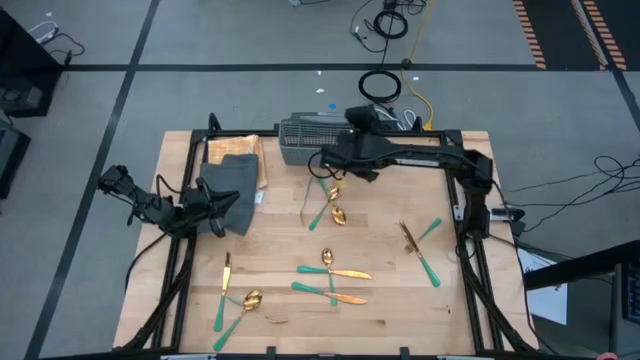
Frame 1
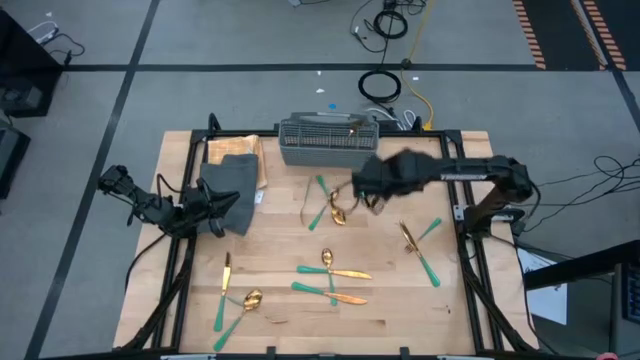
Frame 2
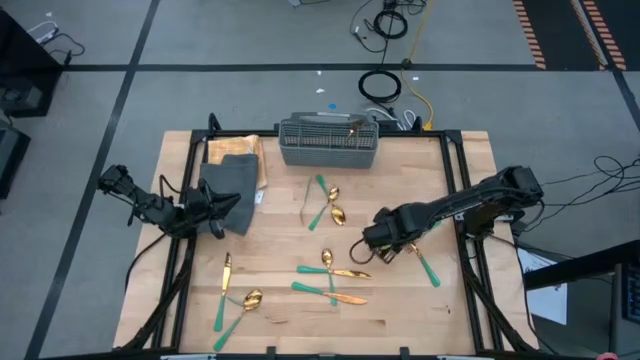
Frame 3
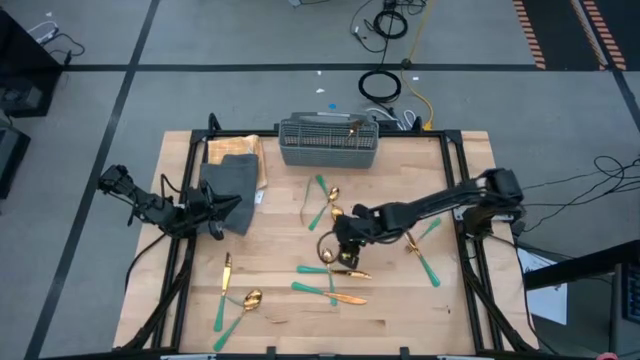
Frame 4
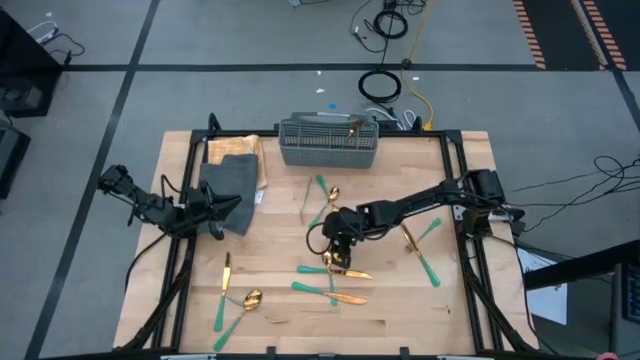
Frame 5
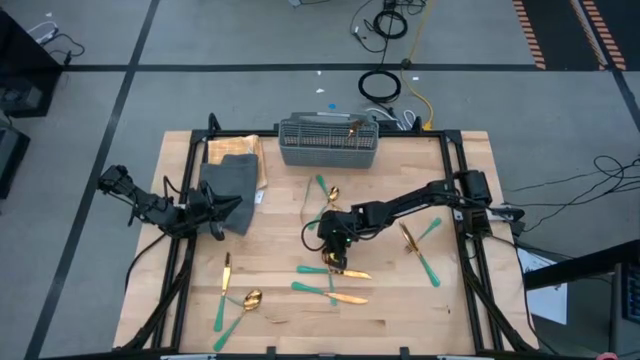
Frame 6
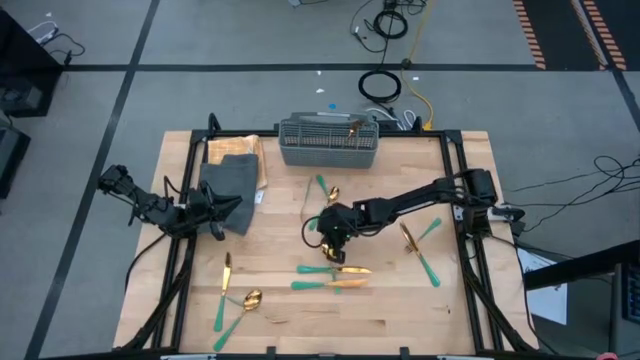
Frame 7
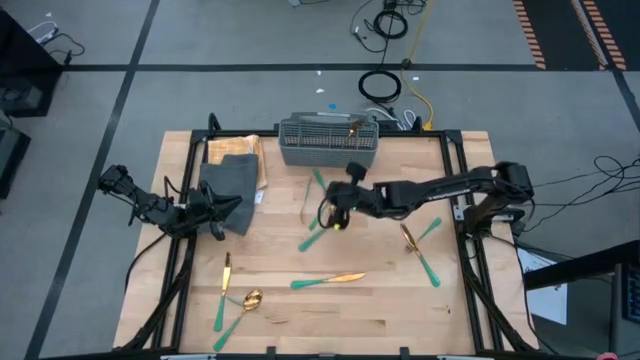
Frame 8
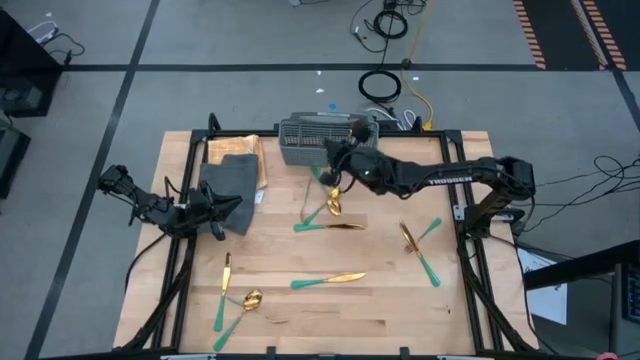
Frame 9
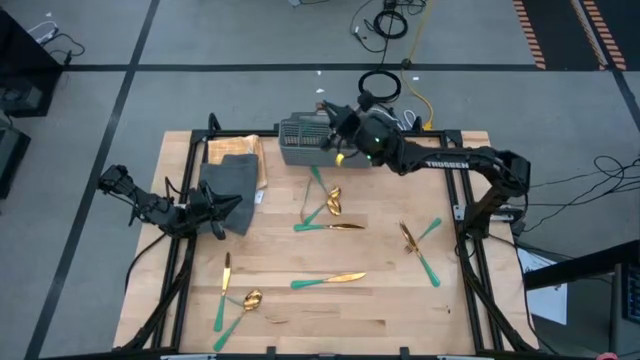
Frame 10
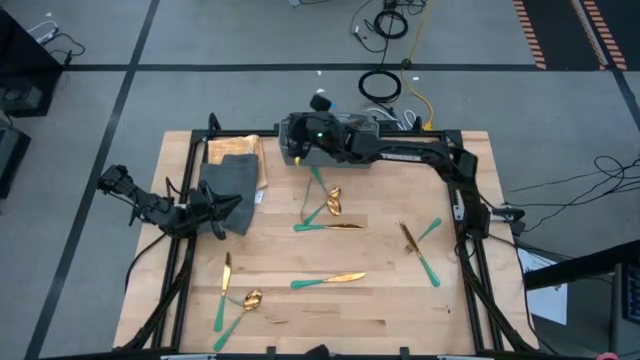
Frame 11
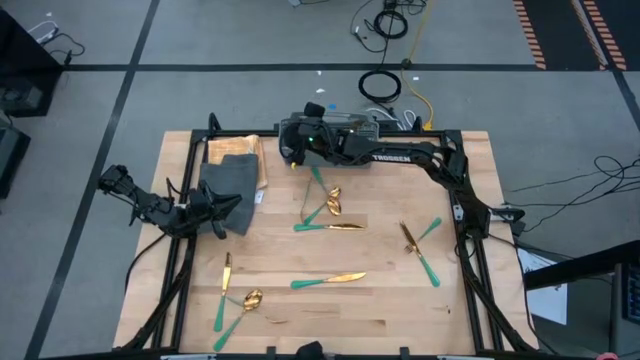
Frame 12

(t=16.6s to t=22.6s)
Task: Sort silverware
Put the green spoon into the silverware basket

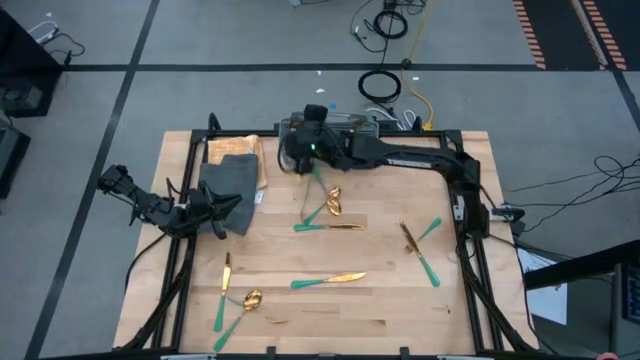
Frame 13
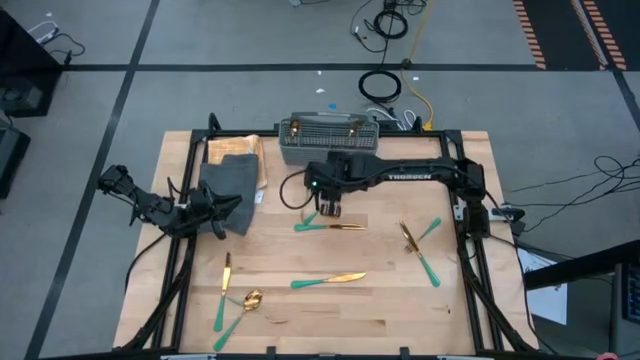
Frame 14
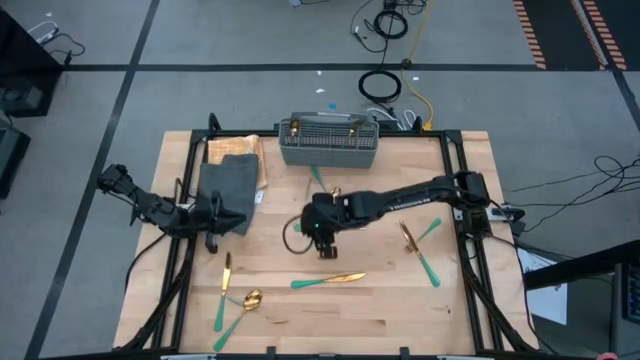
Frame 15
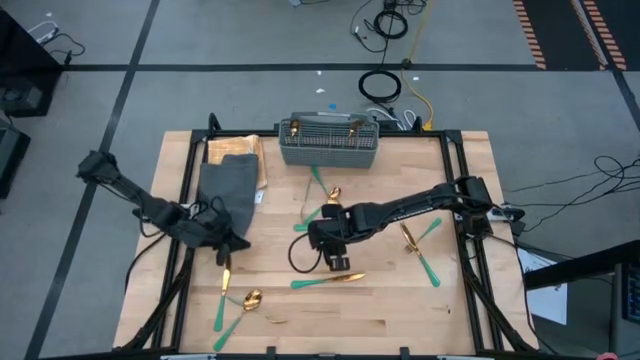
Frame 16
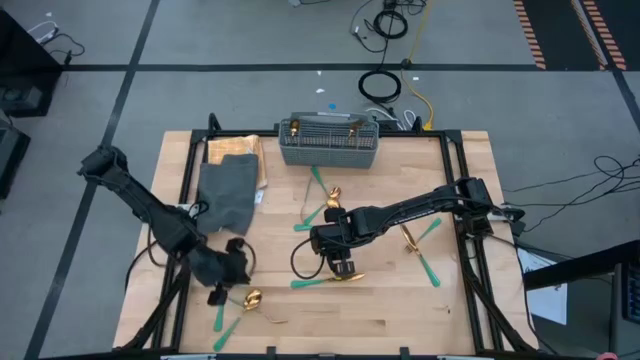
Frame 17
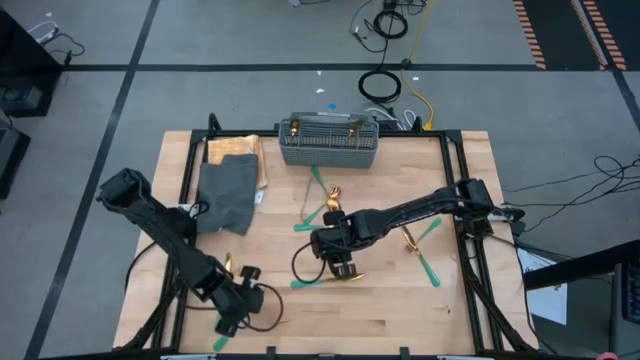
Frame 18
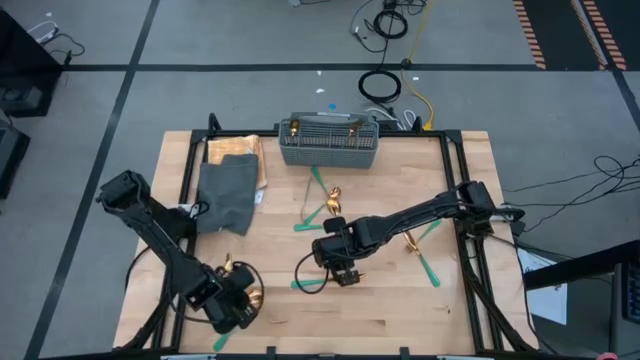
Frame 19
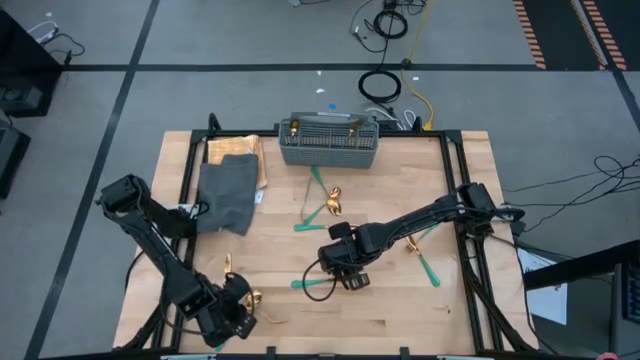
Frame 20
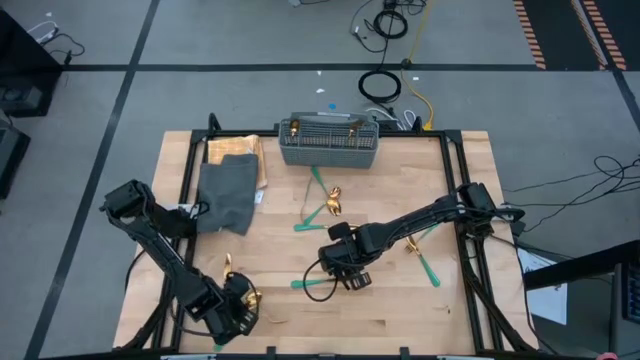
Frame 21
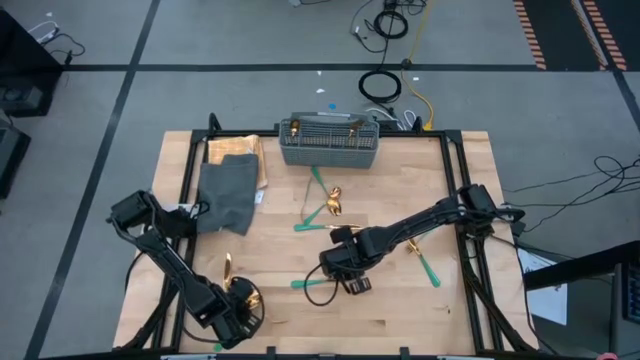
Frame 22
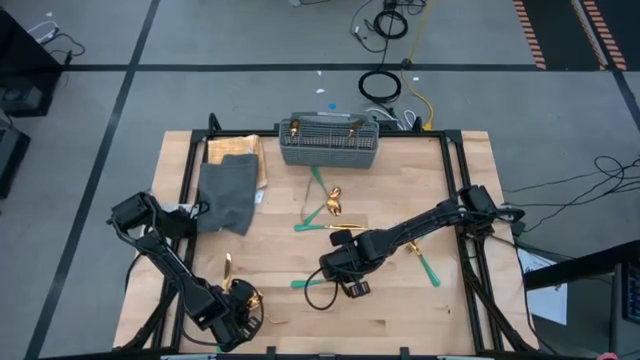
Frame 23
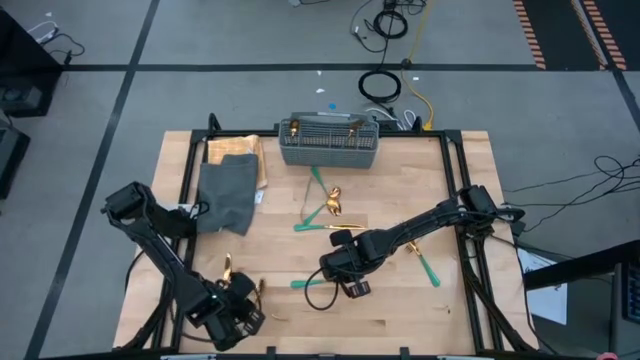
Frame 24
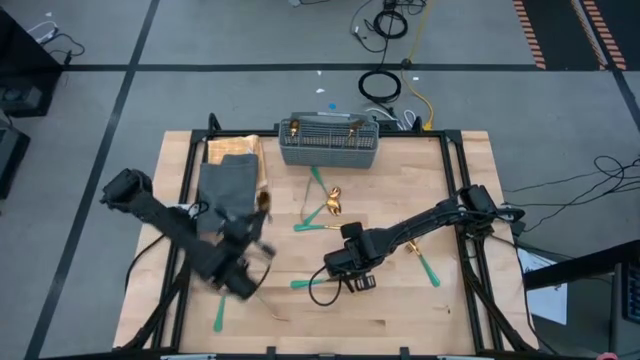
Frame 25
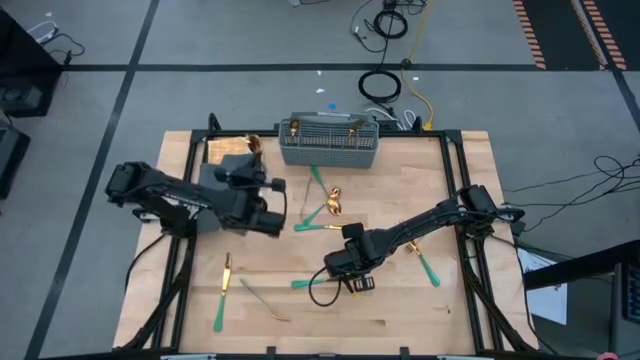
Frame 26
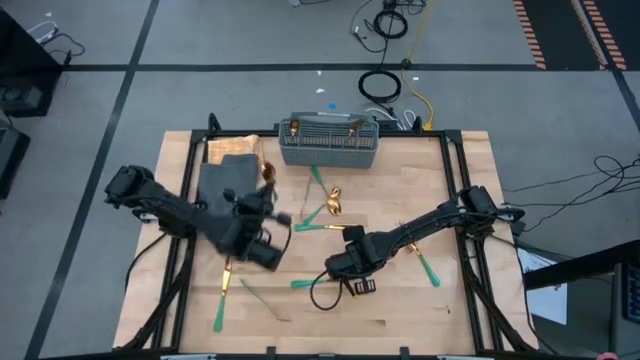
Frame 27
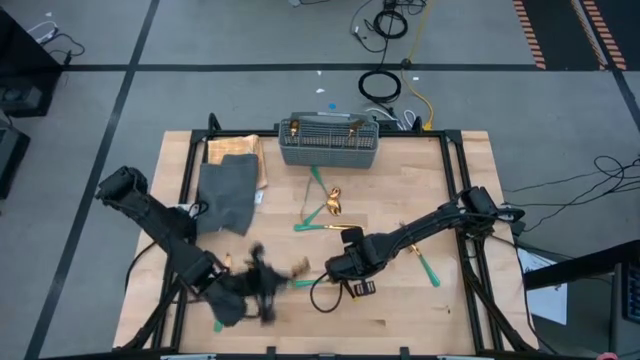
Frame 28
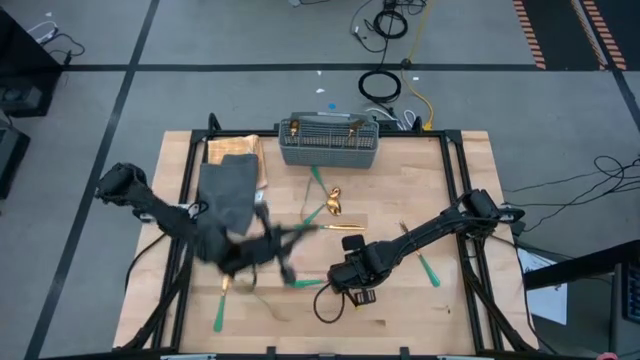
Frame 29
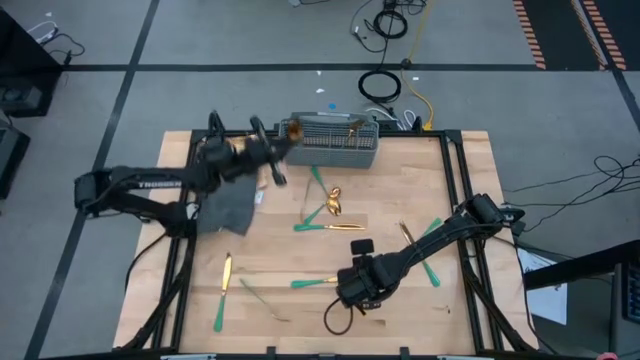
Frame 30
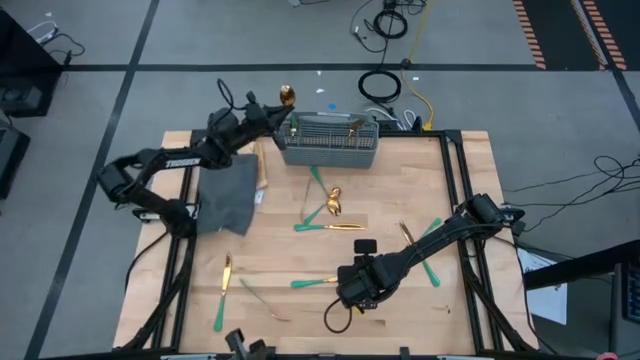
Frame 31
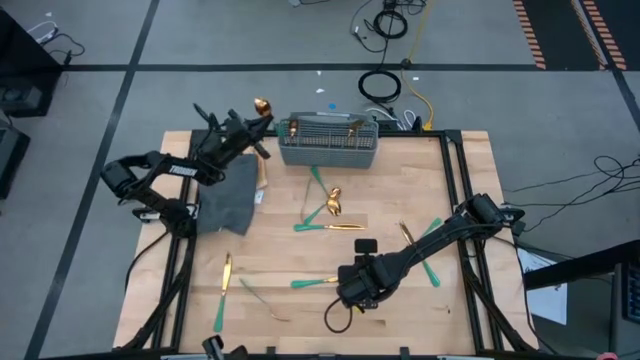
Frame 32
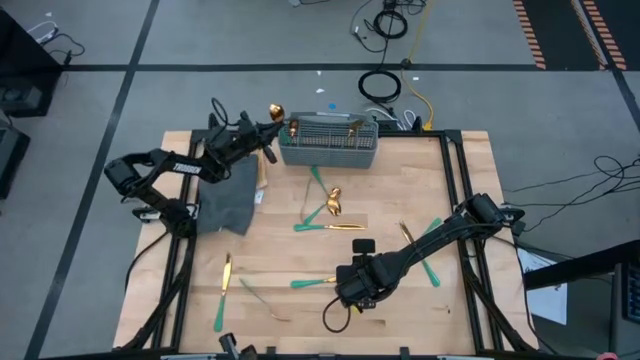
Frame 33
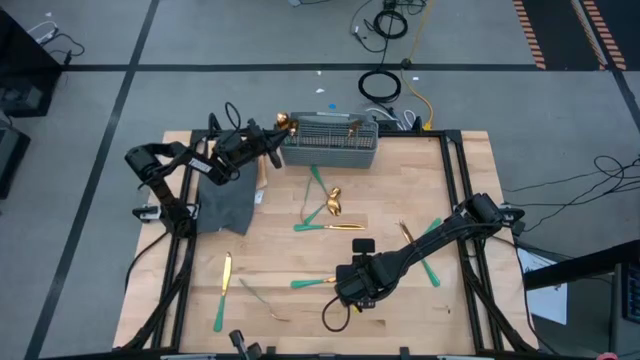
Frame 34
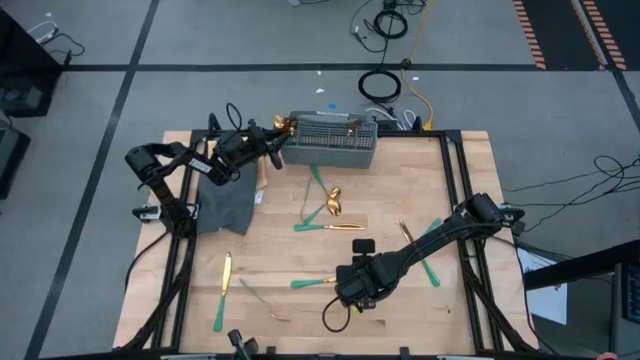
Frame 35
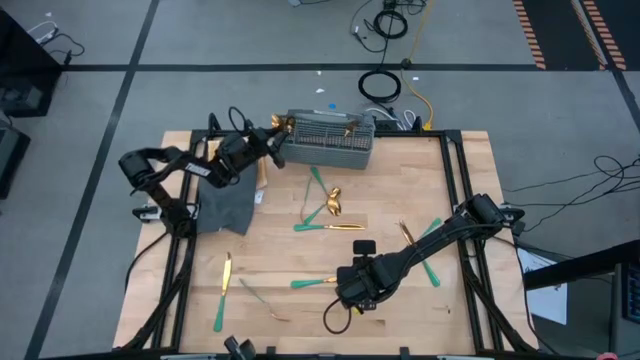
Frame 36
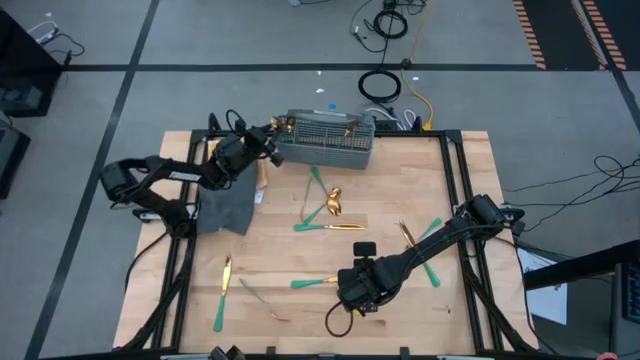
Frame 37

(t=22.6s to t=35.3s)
Put the green spoon into the silverware organizer

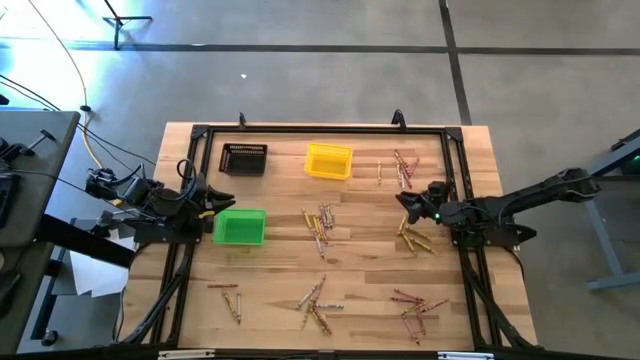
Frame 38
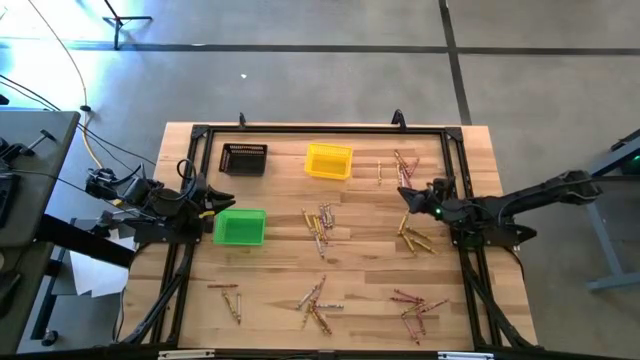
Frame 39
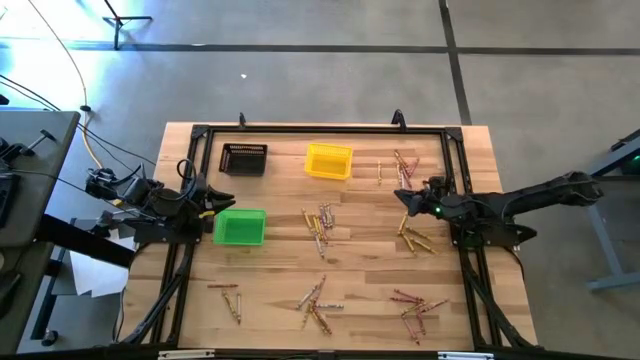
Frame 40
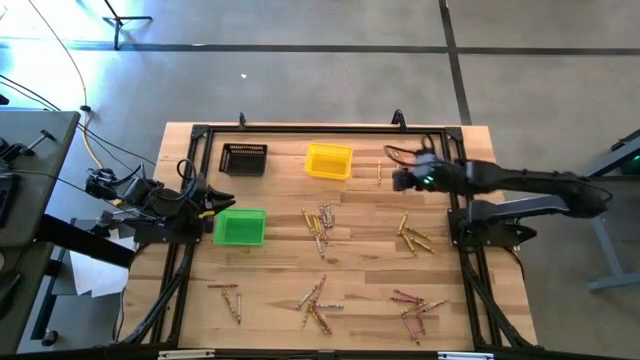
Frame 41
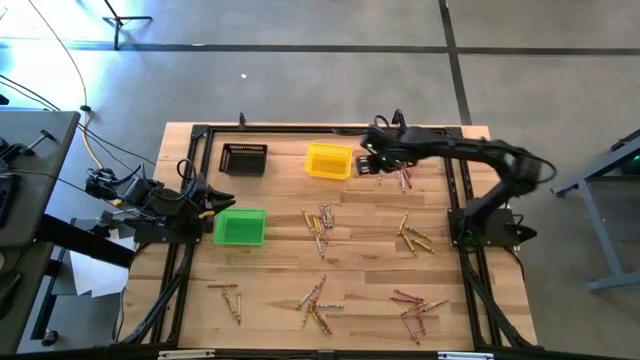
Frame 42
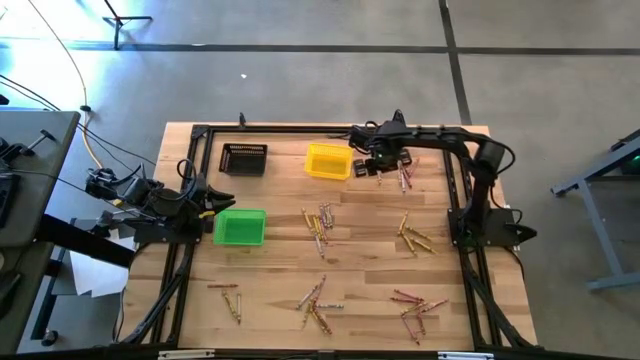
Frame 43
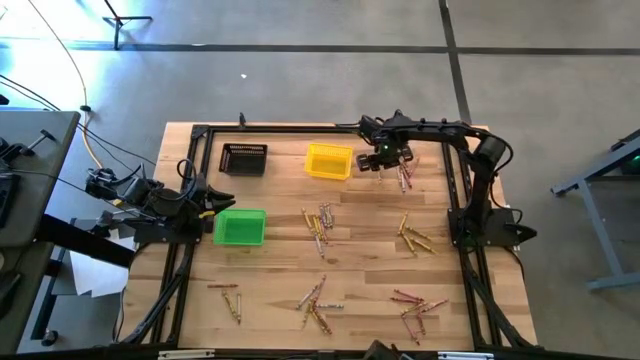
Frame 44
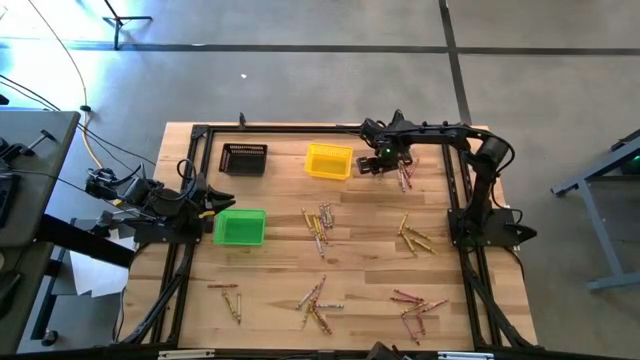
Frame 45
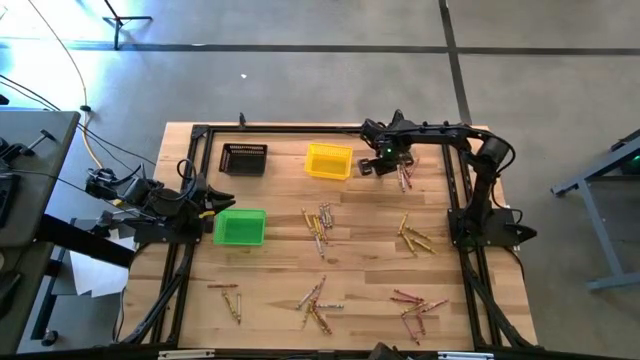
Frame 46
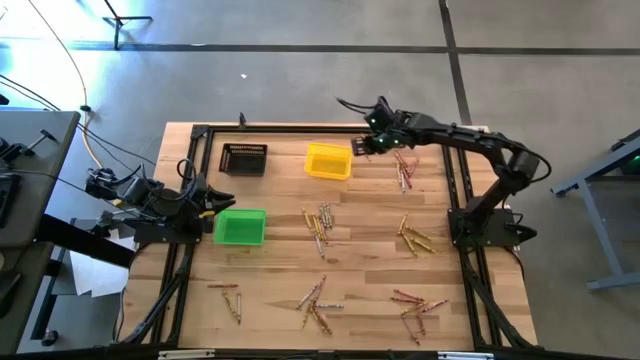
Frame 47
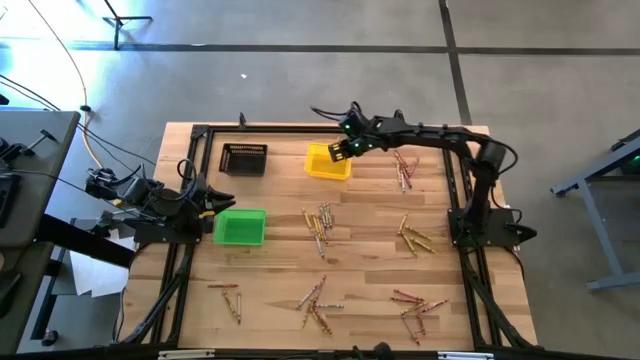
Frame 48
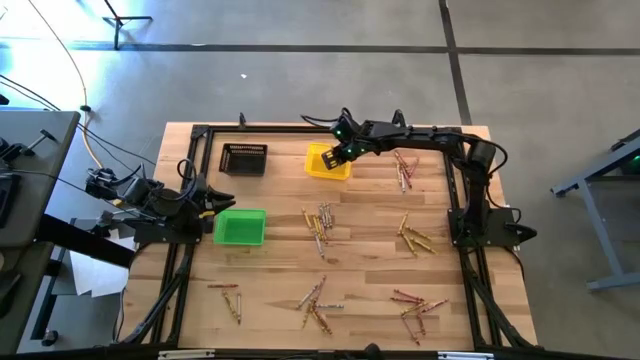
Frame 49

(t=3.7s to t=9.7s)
Task: Sort crayons
Put the yellow crayon into the yellow bin
